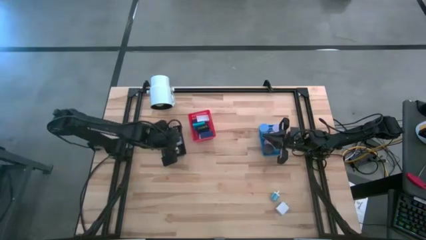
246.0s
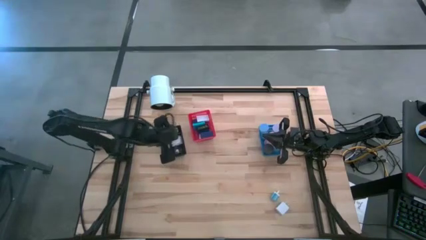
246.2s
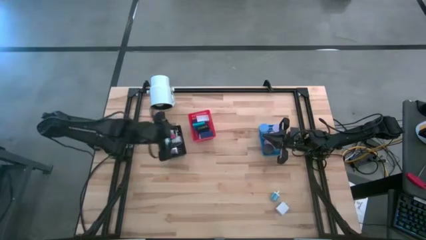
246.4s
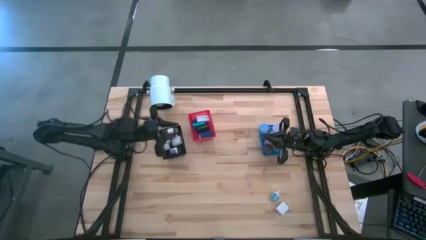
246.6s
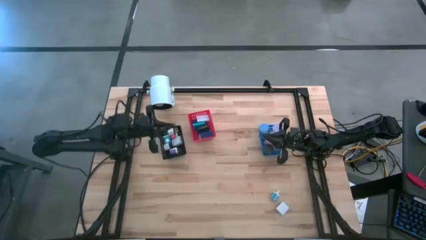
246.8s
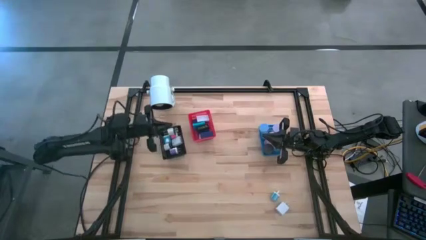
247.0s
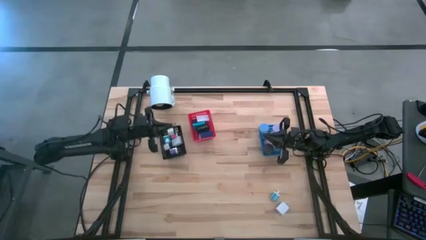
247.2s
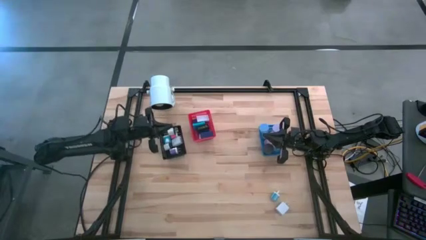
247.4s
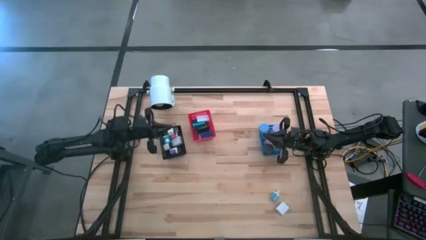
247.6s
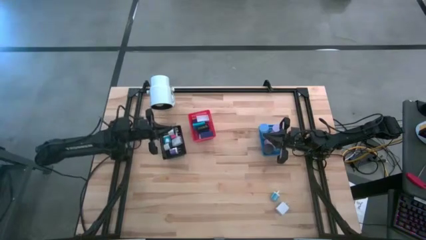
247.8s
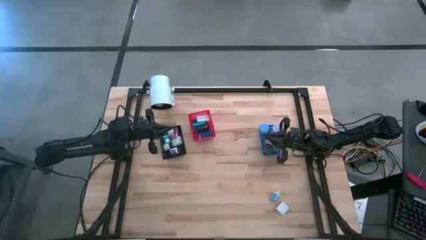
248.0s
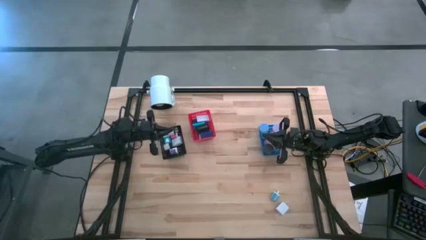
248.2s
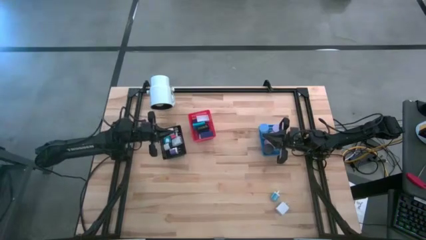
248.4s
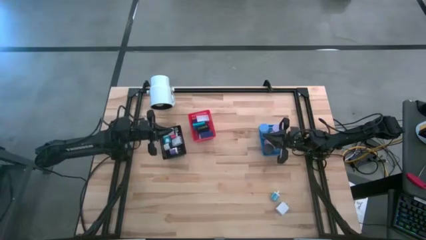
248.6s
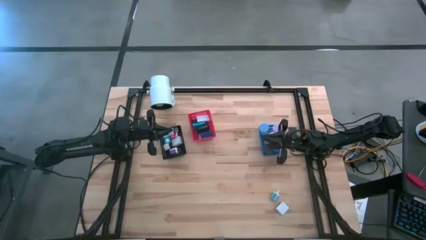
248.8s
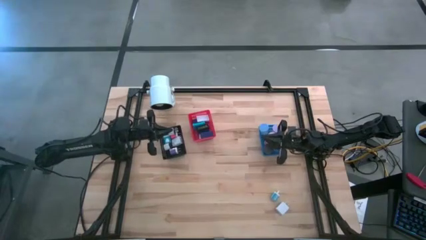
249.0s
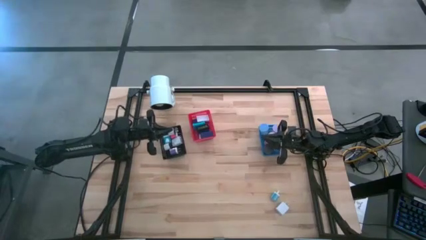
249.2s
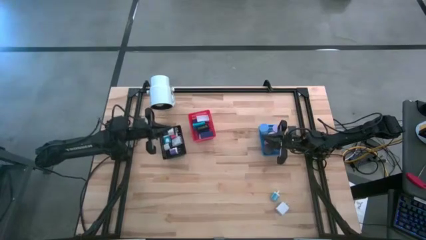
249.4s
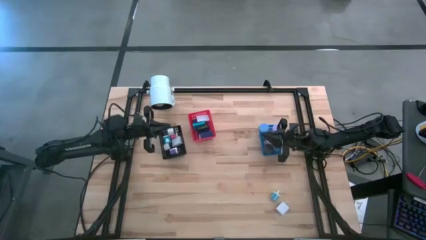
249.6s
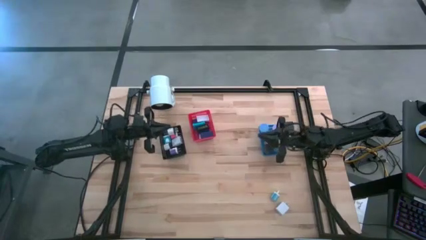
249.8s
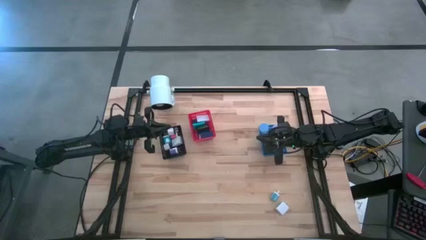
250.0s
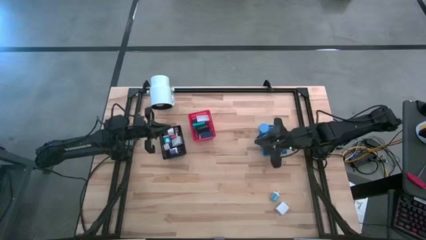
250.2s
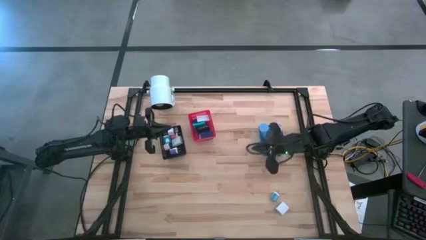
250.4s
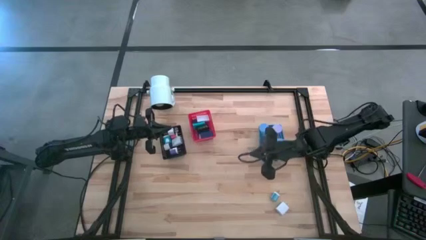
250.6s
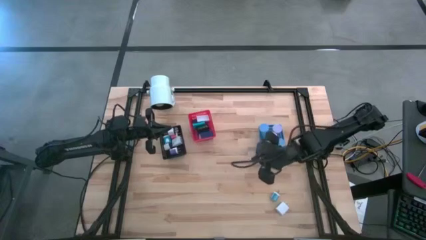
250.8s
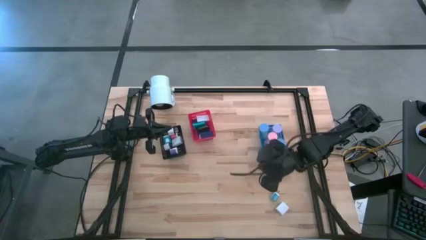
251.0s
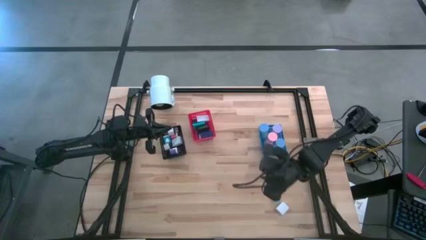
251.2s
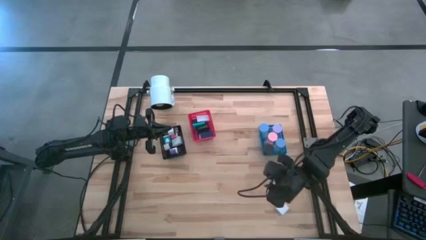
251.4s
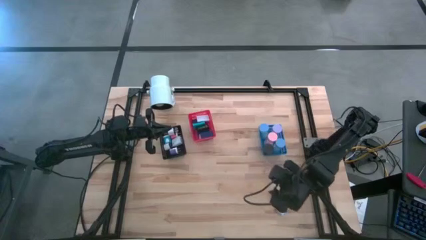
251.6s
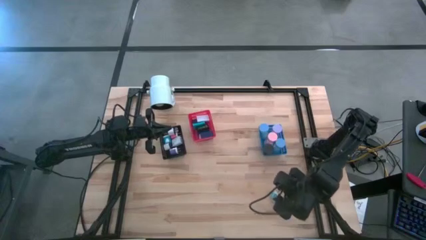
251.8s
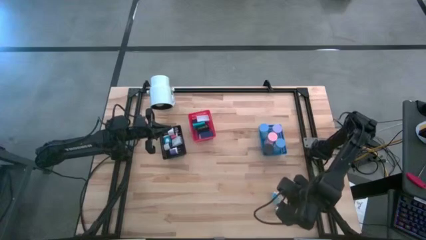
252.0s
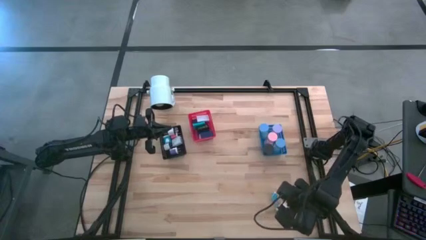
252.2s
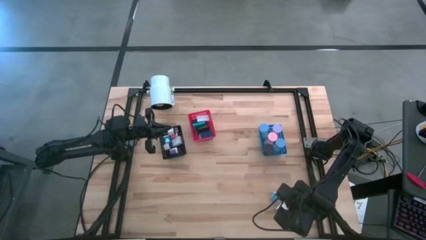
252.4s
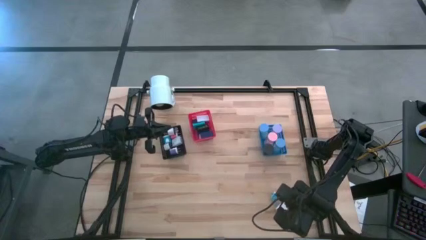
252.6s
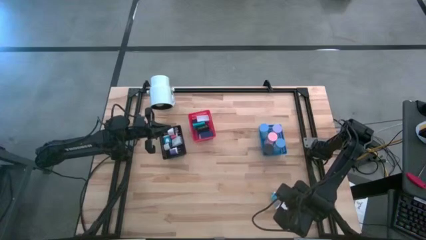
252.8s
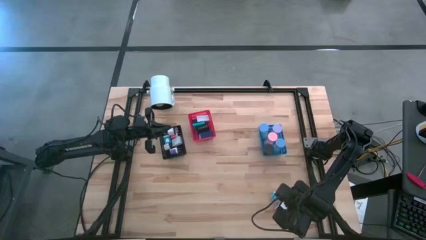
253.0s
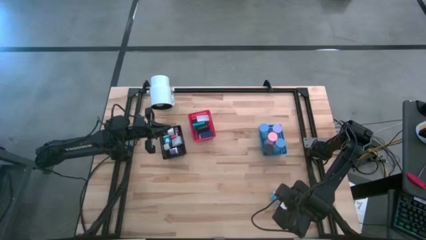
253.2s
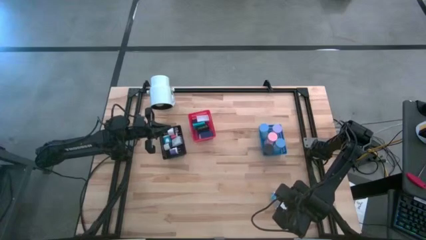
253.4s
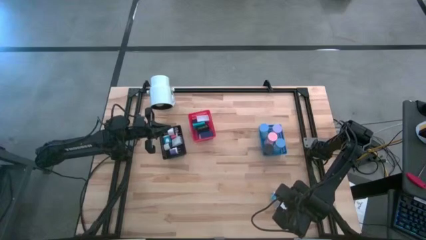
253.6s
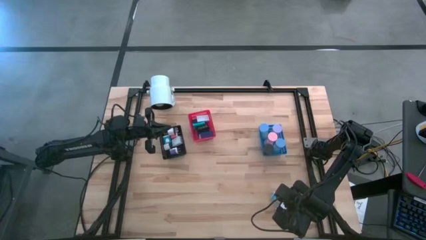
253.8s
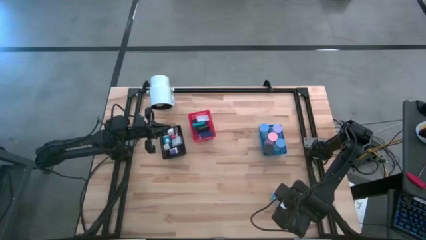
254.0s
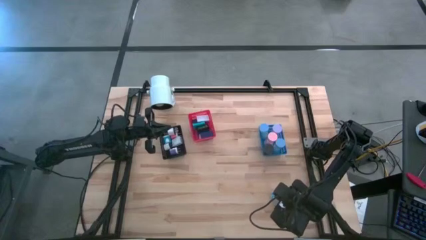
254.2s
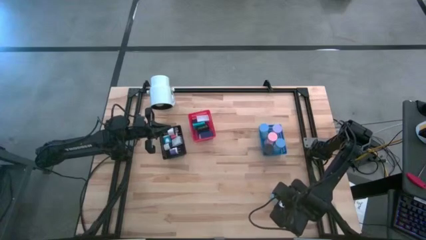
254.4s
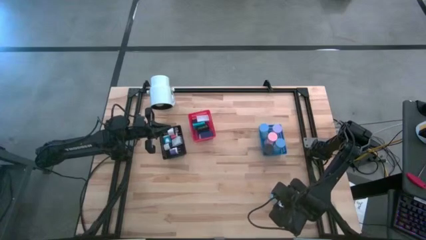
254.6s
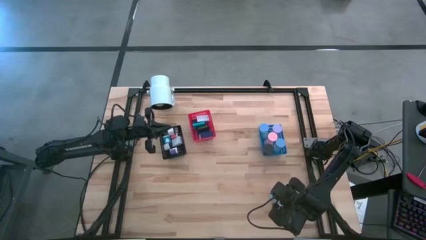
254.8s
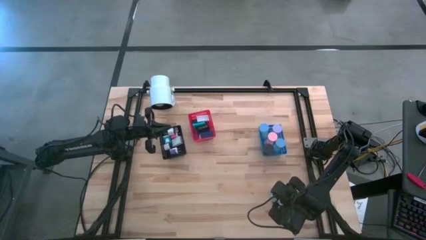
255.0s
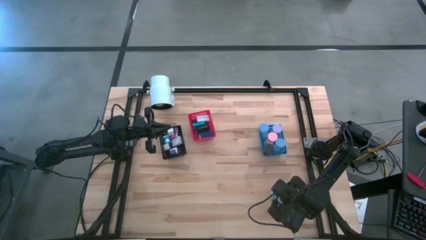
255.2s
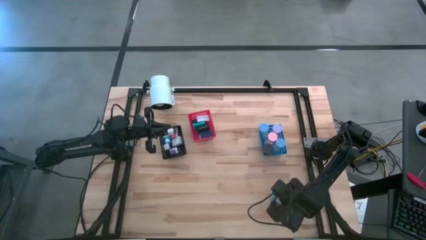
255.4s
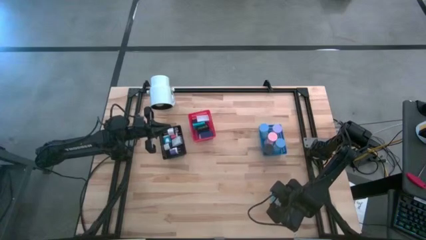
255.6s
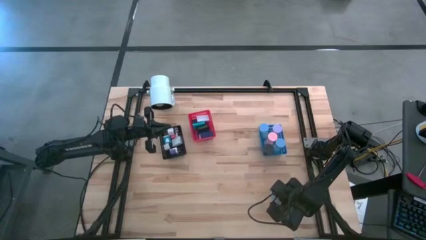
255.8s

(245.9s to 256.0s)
Task: Pick & Place Office items
Put the light blue charger adapter into the black bin

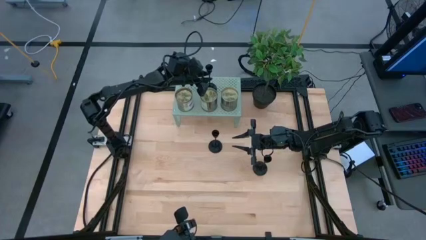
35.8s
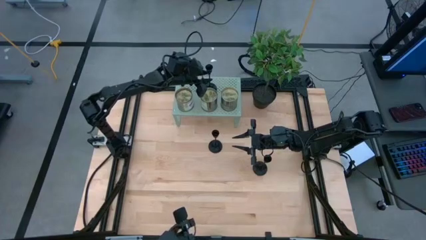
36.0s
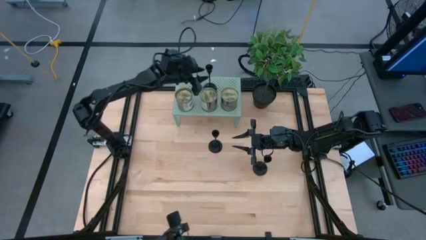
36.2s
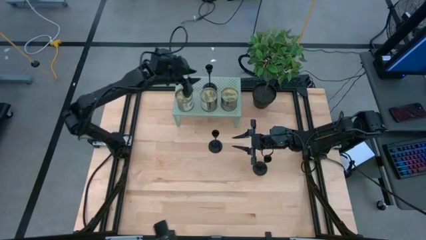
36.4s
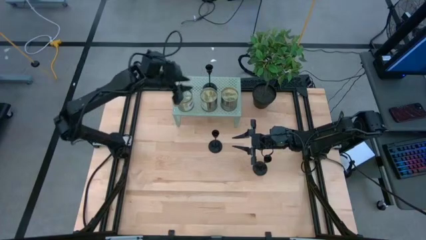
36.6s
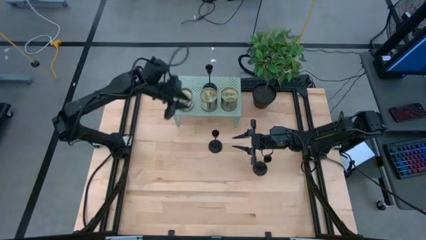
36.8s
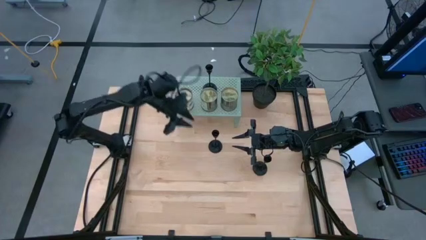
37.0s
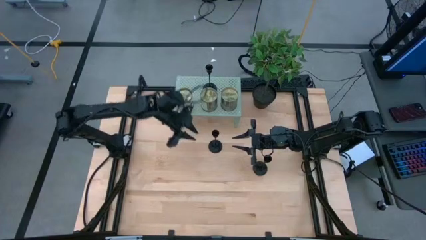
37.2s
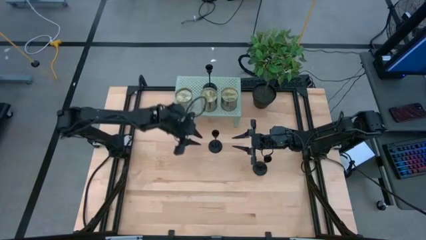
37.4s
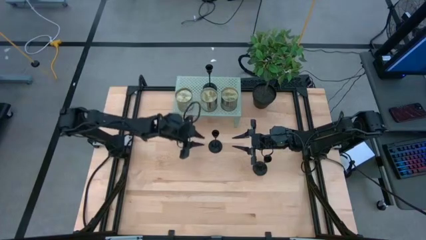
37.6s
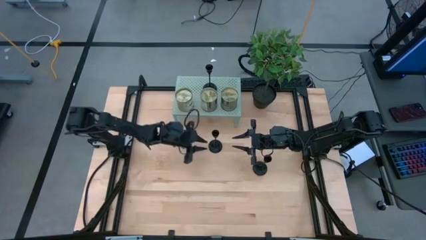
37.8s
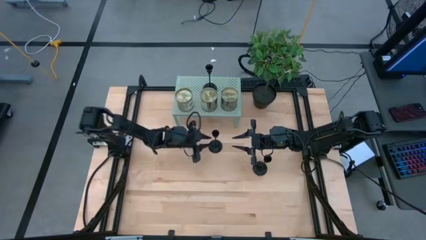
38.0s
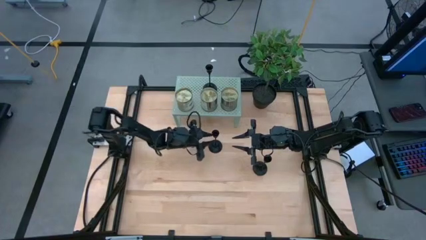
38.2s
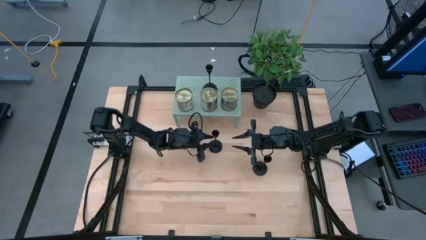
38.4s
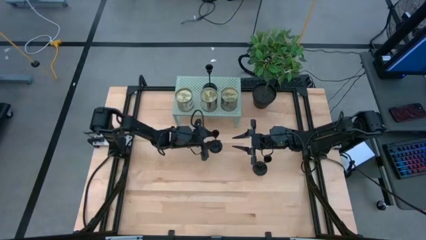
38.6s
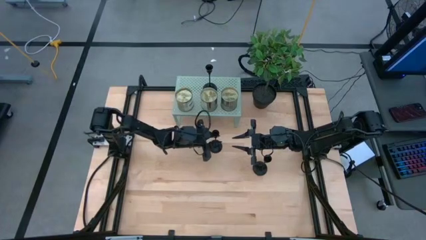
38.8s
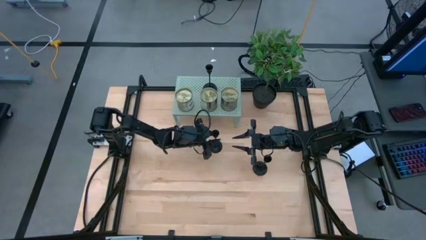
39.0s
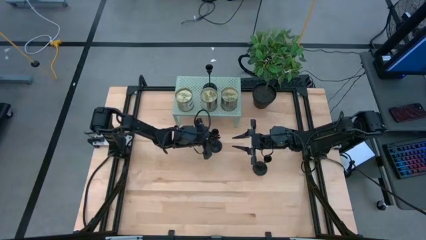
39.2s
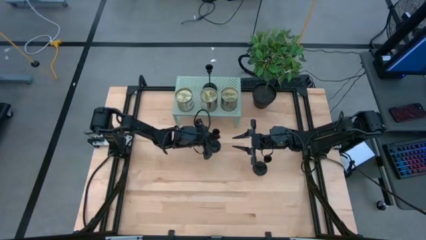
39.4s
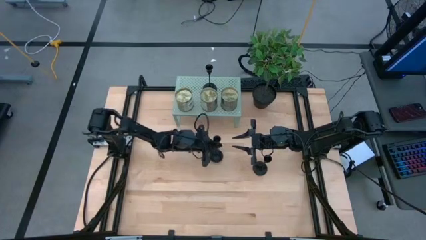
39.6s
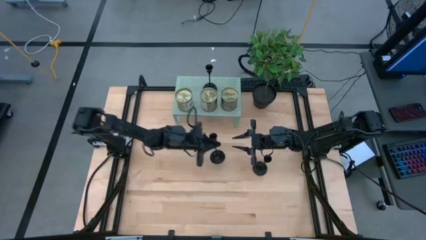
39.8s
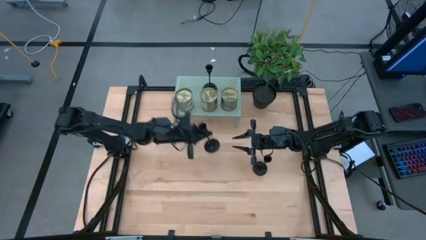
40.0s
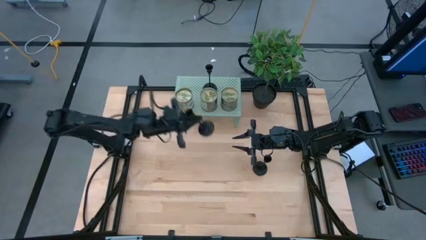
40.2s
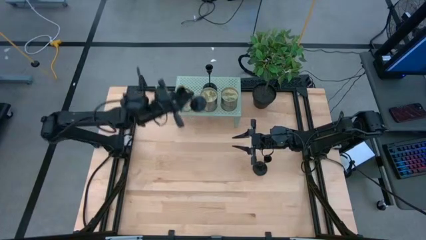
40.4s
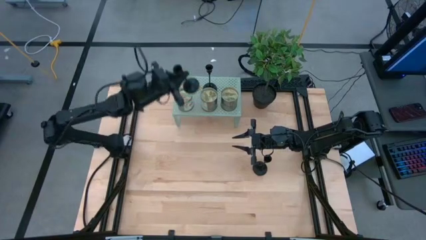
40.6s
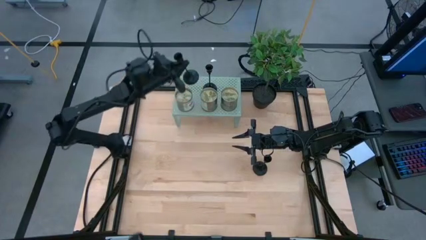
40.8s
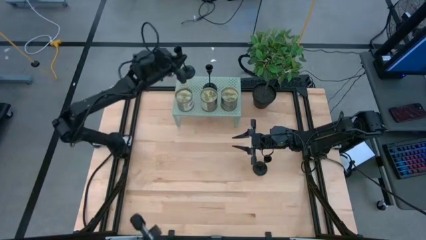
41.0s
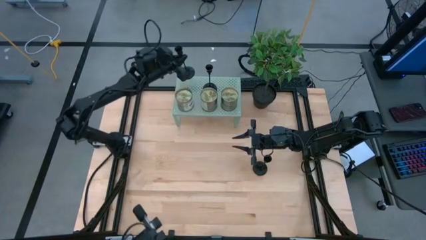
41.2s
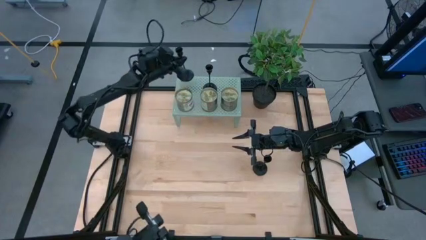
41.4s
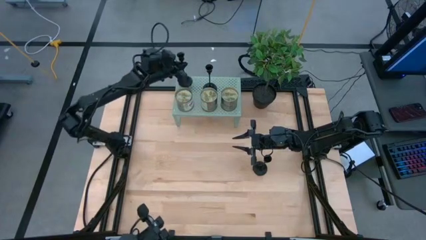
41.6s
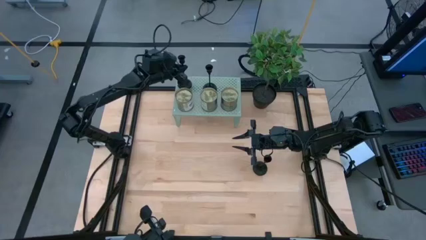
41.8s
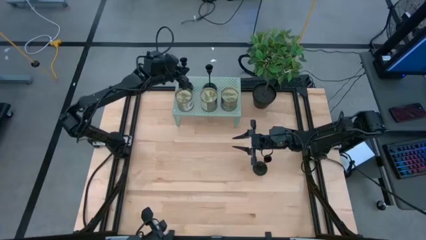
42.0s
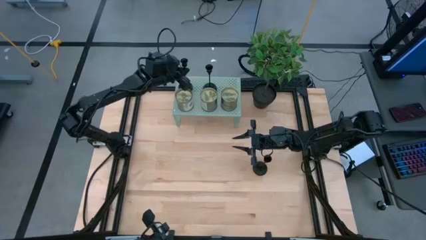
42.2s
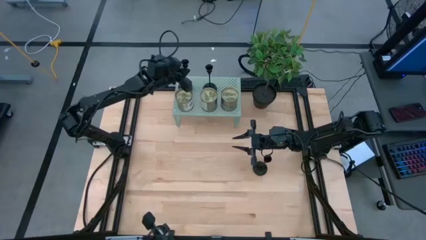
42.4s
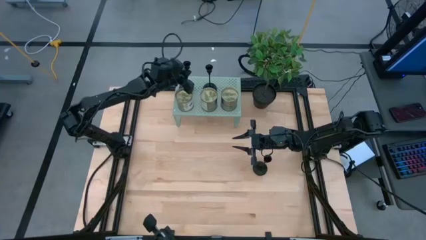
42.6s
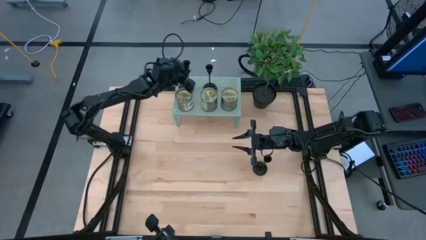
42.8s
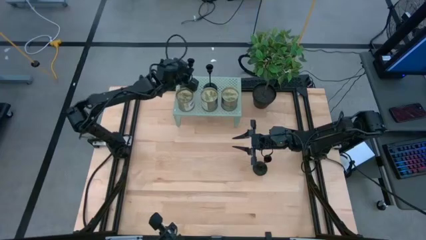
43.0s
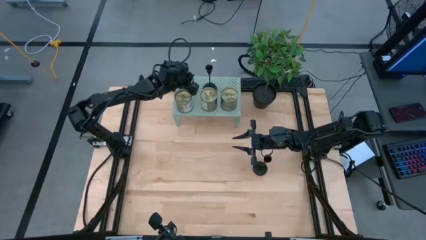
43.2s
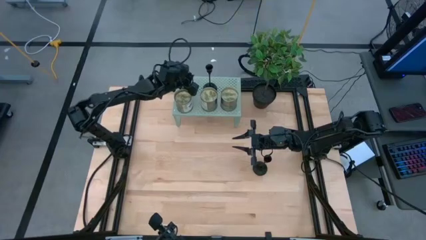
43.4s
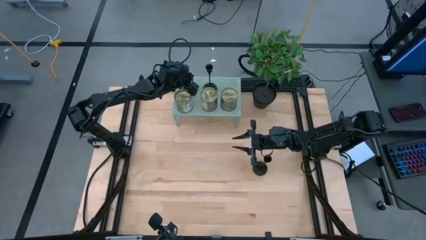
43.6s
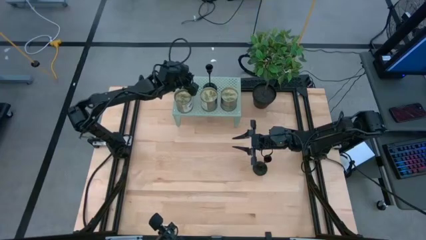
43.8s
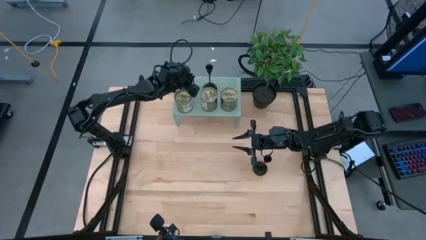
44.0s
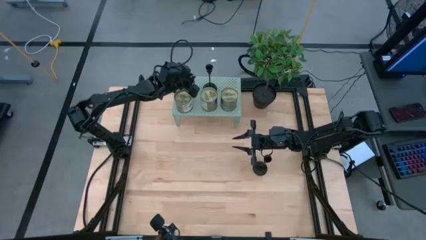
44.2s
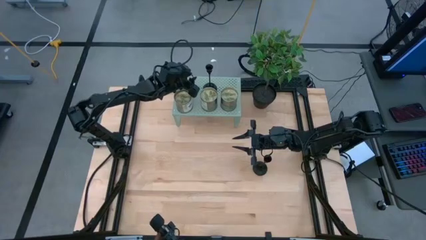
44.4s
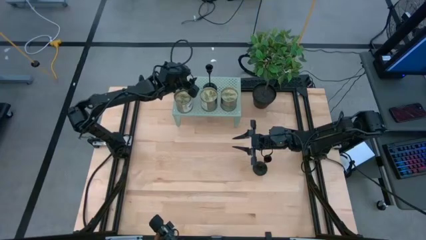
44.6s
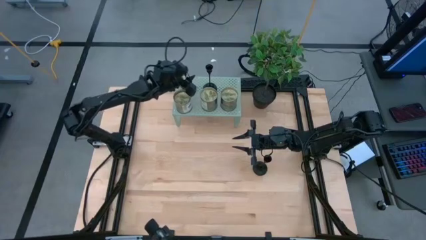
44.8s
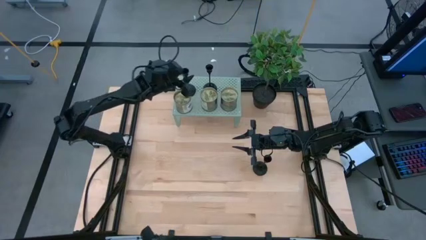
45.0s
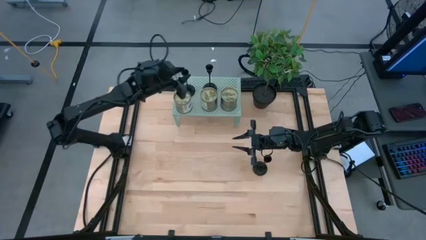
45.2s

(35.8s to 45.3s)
Task: Pick & Place candle stick holders
Put the left black candle holder on the shelf
